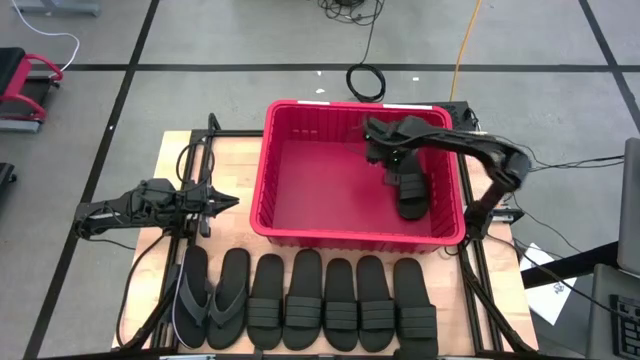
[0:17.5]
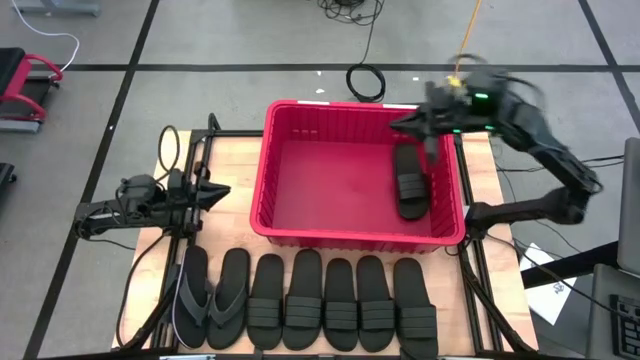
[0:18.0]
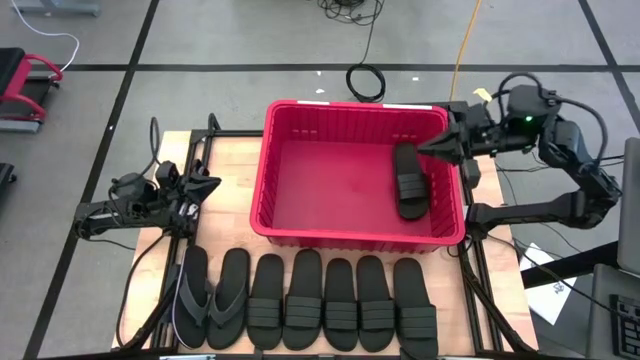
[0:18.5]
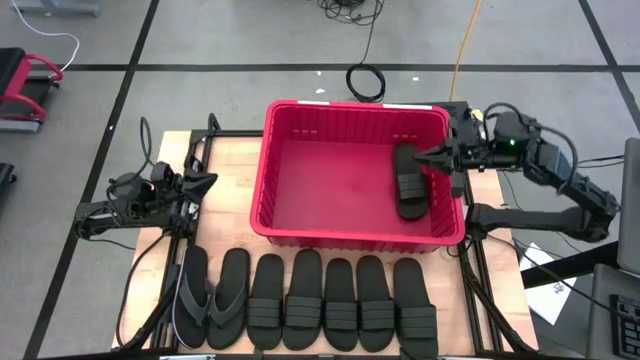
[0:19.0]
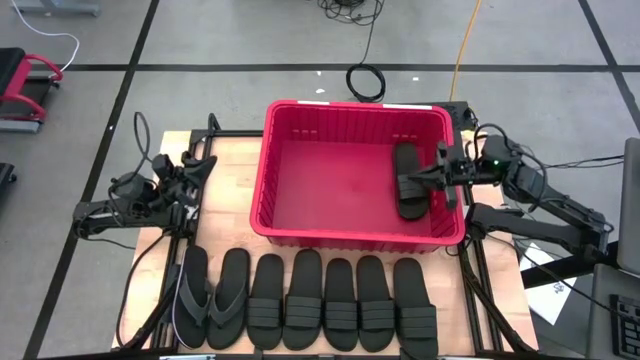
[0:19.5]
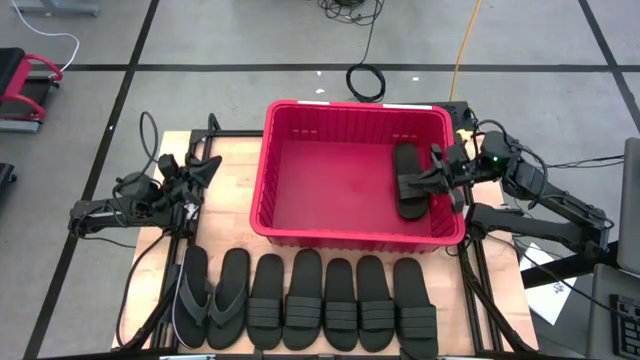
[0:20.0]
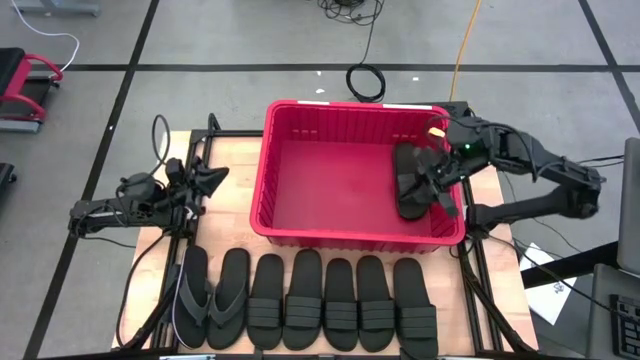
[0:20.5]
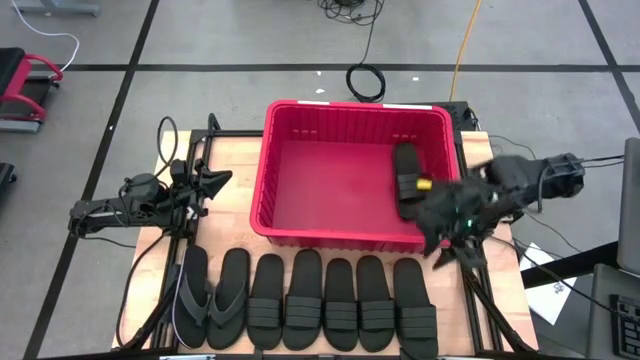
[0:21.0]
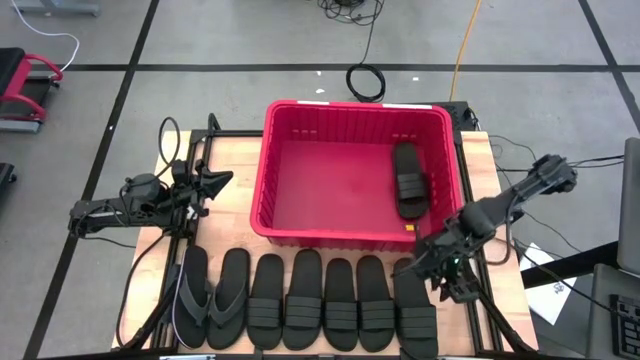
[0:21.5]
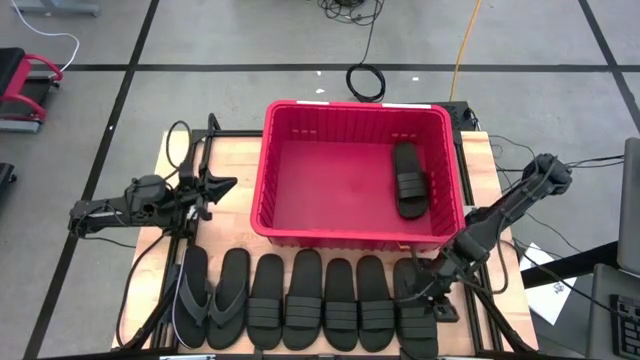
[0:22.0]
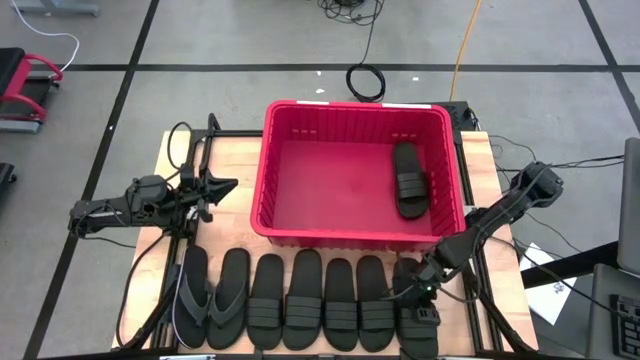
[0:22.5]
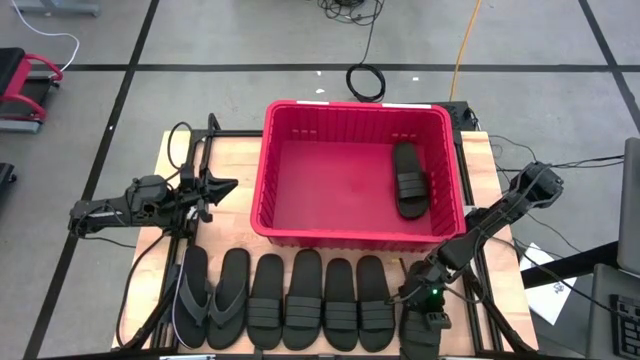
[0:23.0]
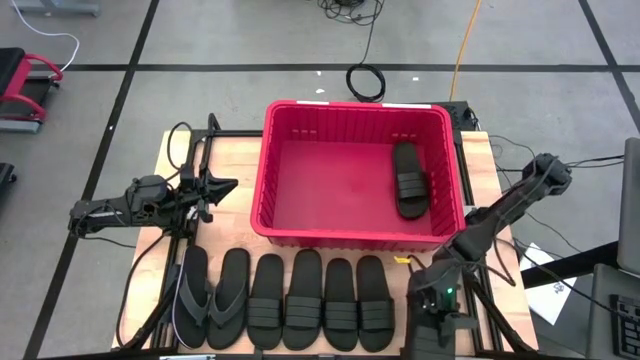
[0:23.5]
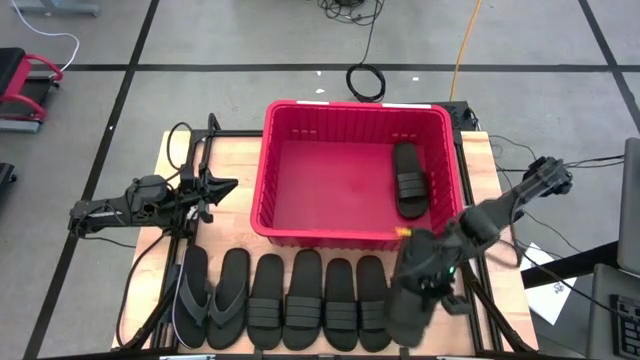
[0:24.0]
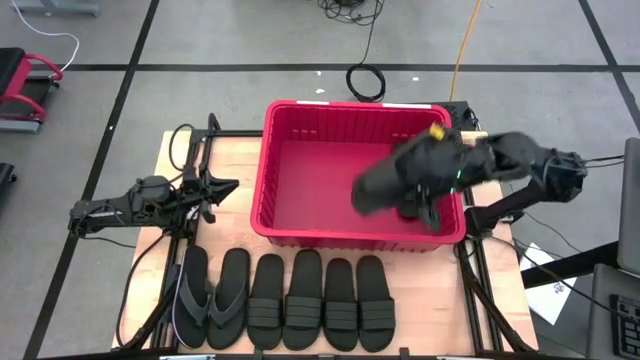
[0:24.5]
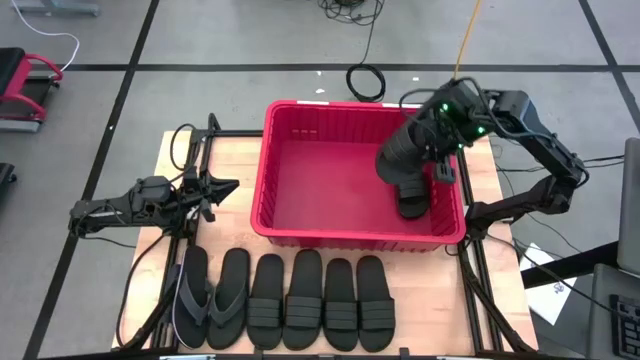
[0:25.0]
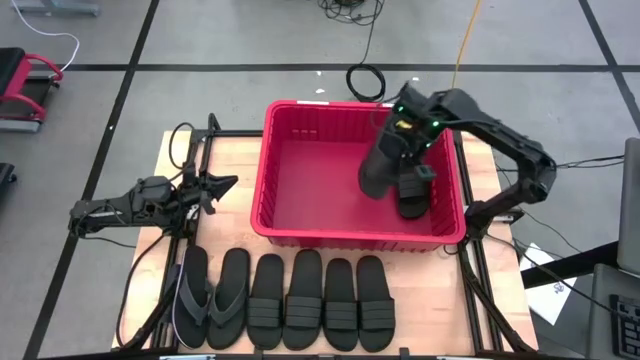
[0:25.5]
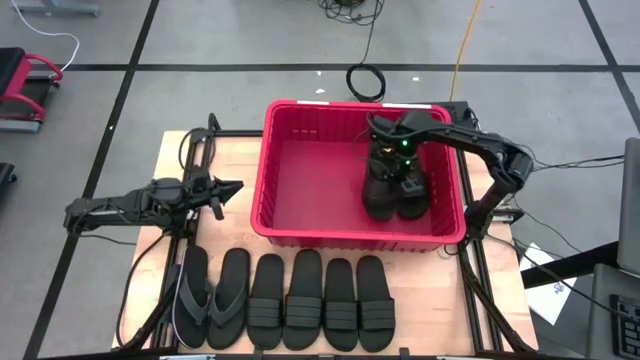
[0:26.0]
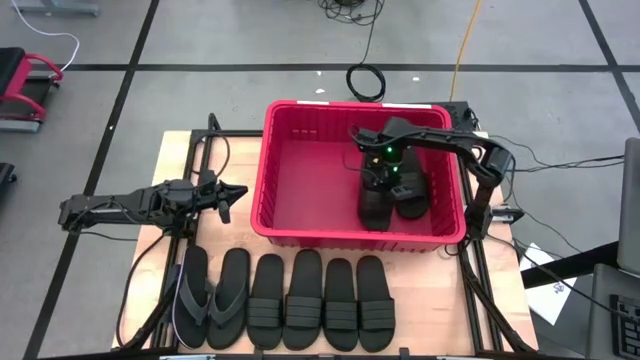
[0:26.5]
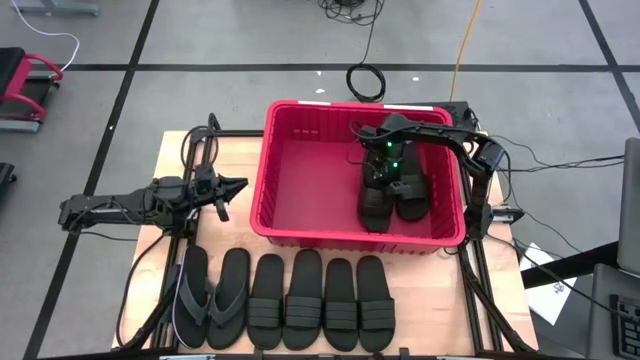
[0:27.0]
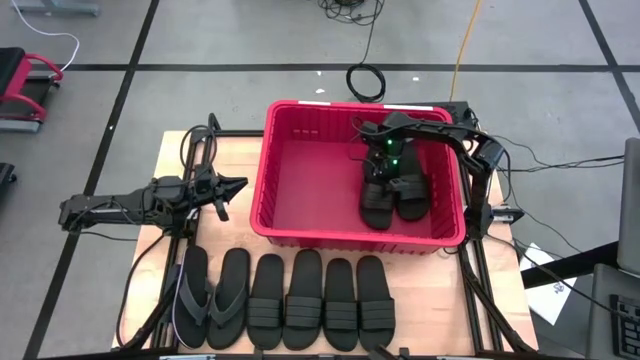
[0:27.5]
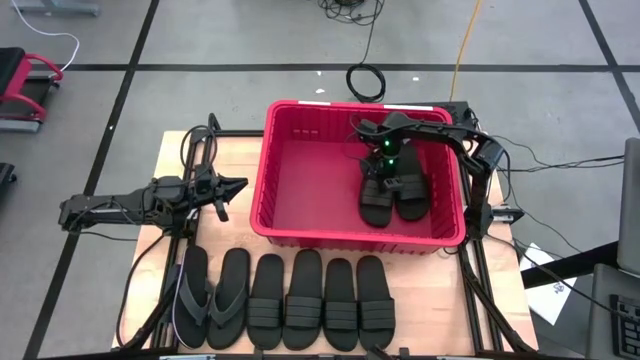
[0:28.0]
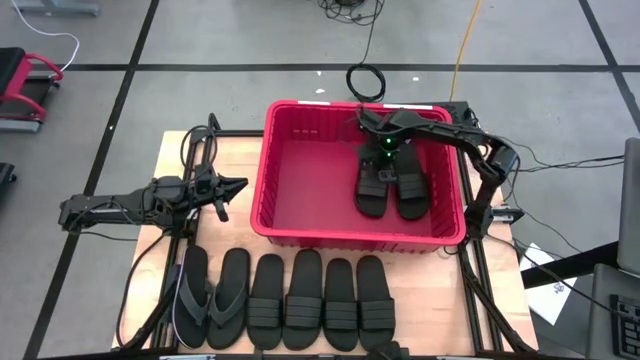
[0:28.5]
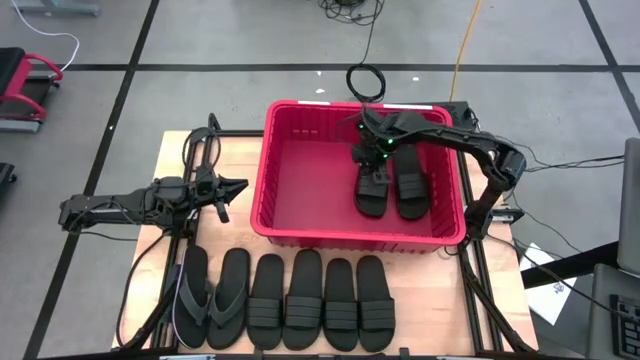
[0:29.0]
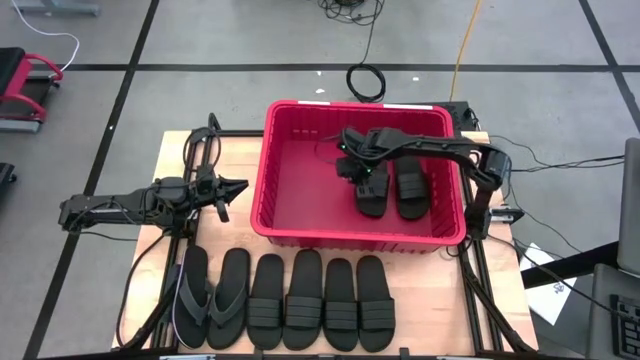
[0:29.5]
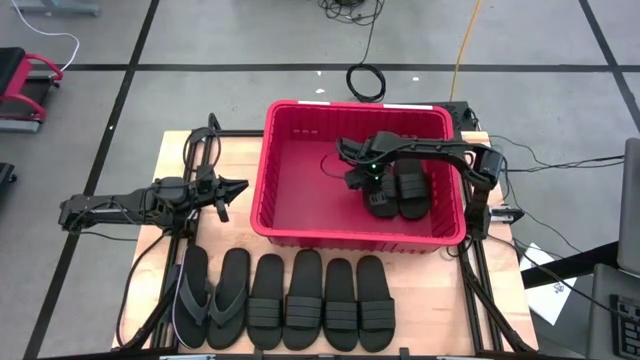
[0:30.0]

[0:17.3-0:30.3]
Task: Pick and place slides into bin
Put the black slipper into the red bin

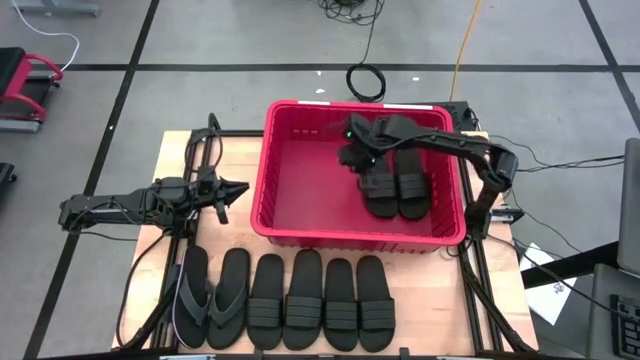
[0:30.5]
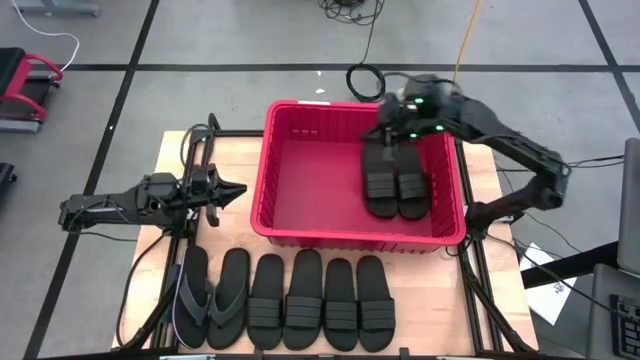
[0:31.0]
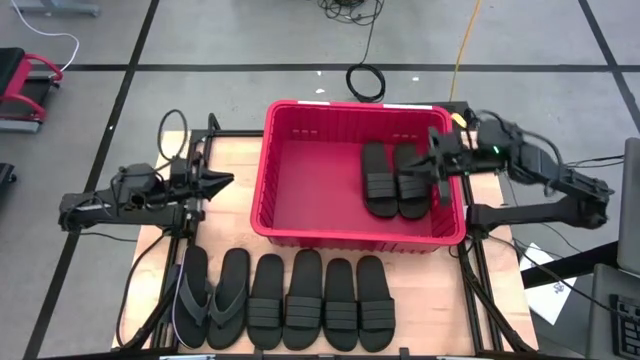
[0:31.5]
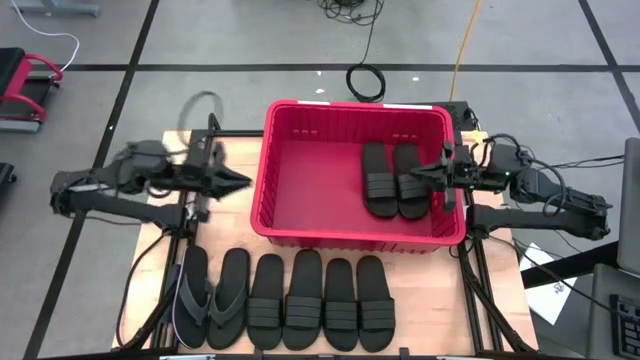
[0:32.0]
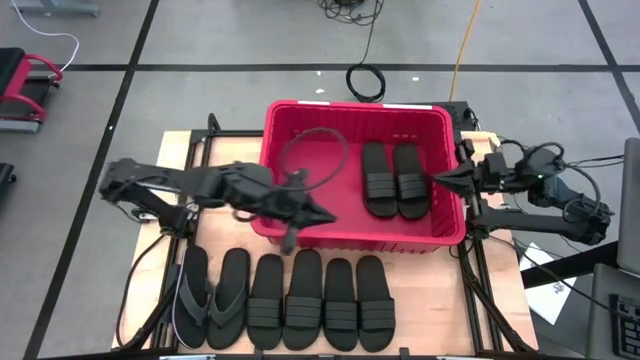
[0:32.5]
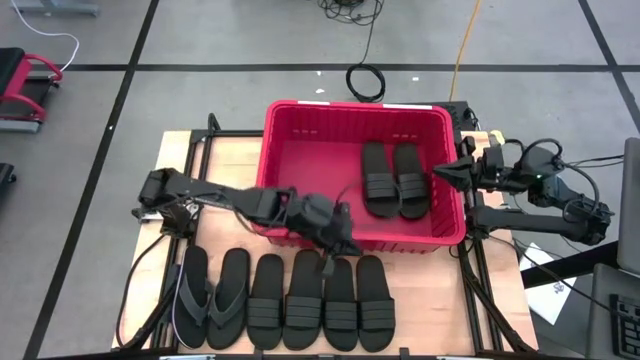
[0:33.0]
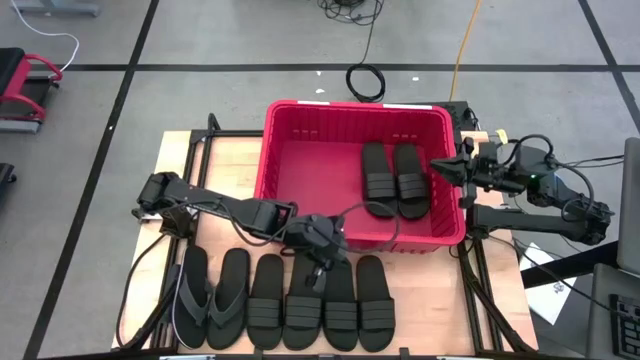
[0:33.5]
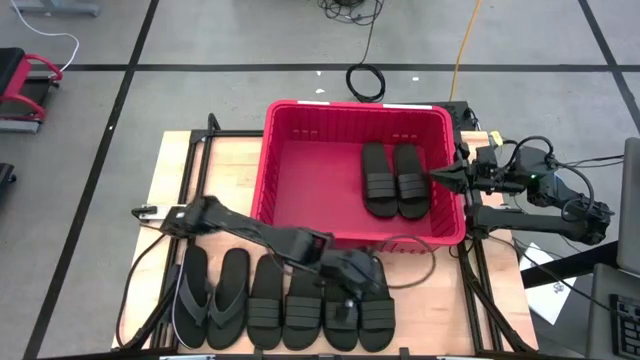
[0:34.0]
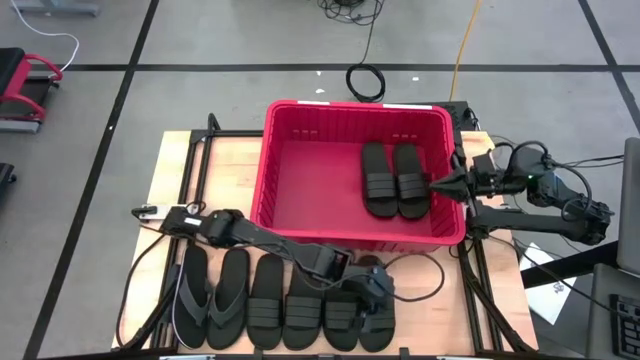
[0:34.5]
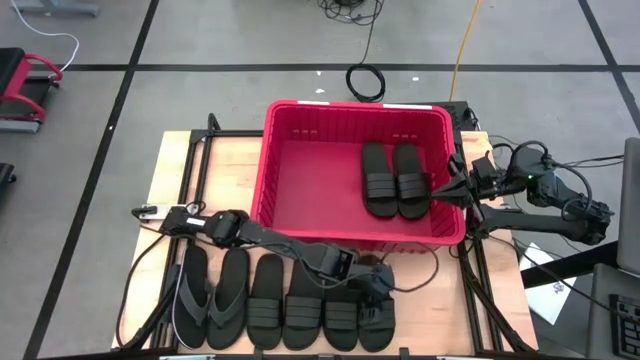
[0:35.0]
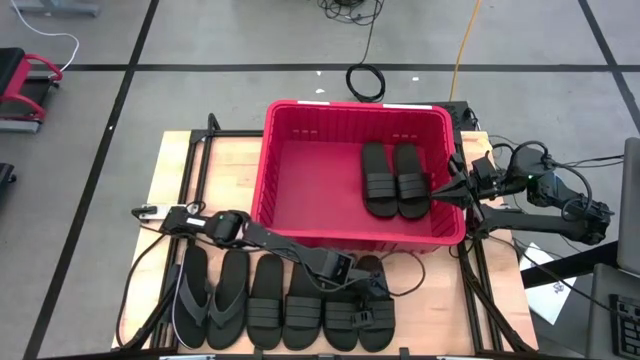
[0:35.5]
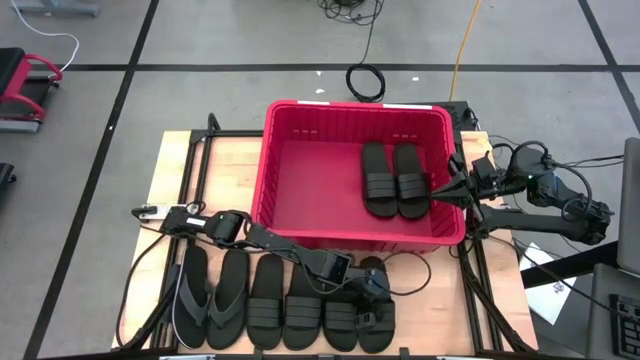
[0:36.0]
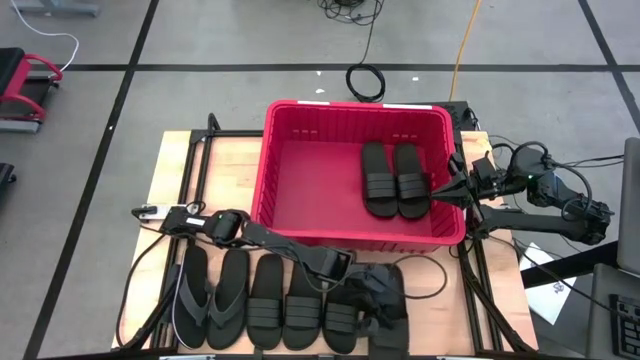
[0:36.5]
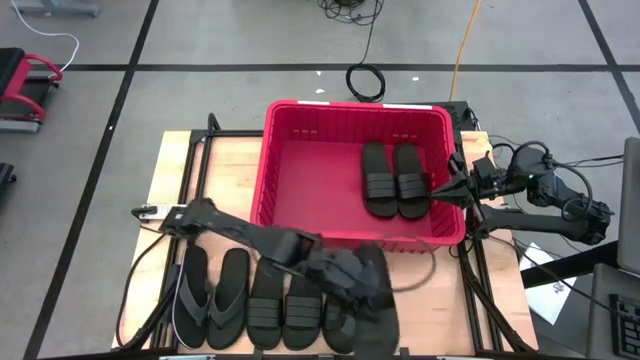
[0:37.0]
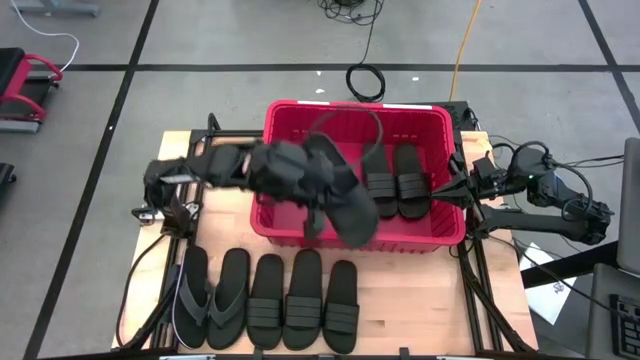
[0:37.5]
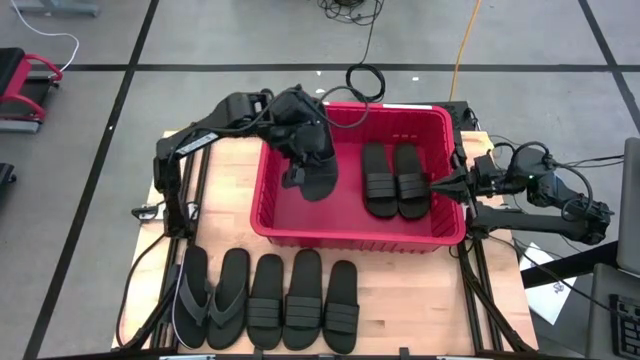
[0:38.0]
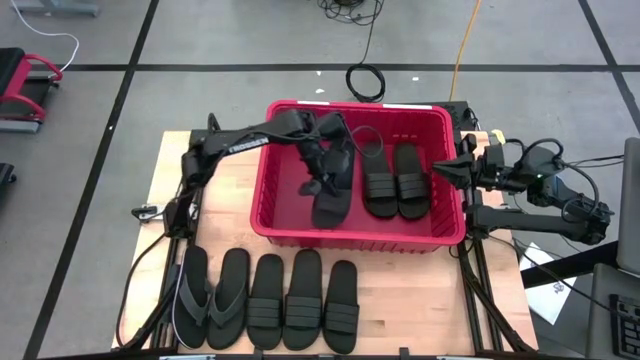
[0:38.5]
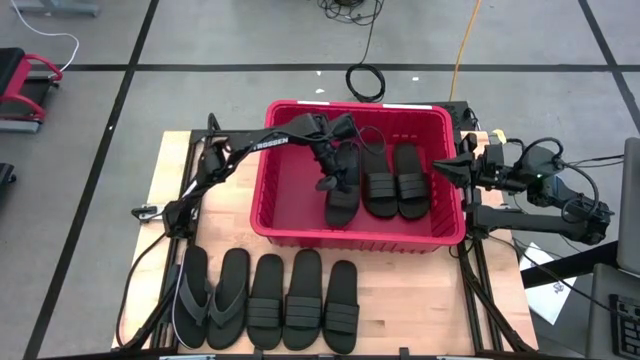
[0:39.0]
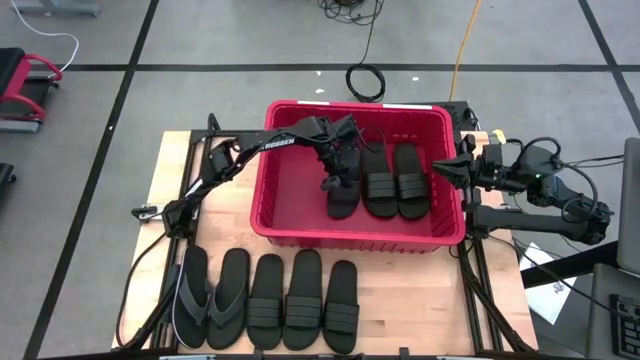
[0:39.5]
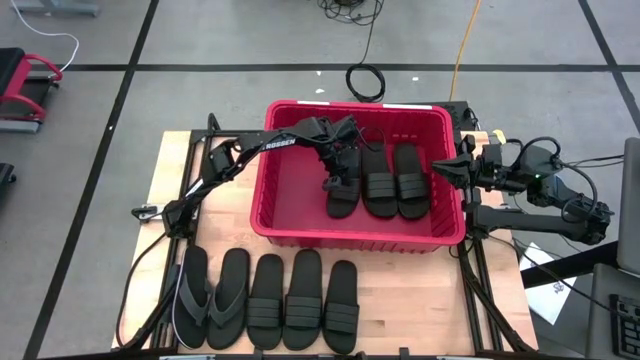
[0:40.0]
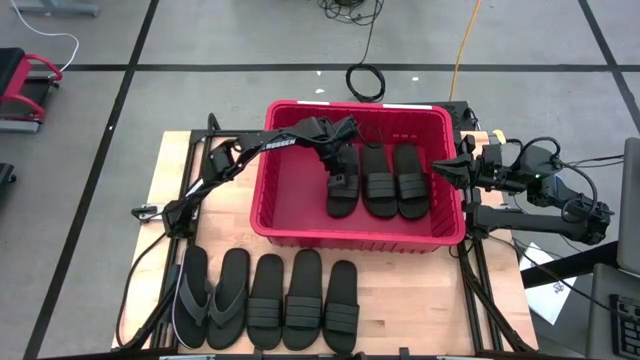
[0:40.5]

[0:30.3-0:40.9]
Put the black slipper into the red bin
